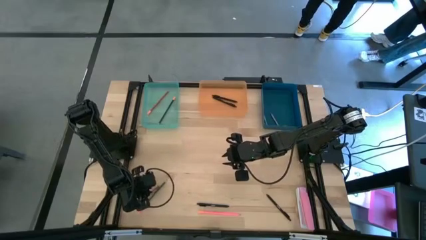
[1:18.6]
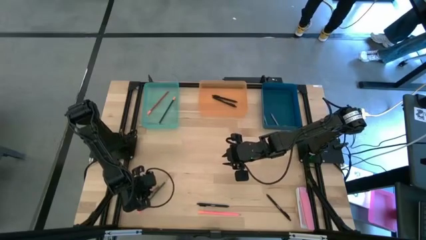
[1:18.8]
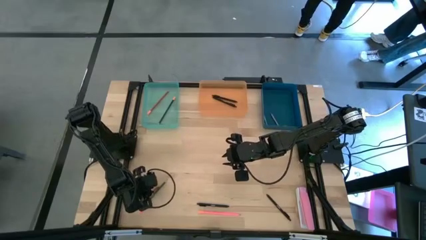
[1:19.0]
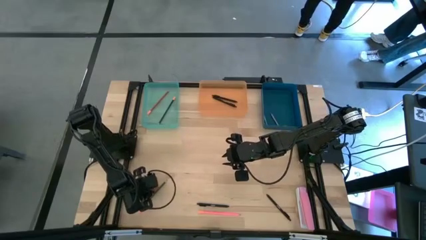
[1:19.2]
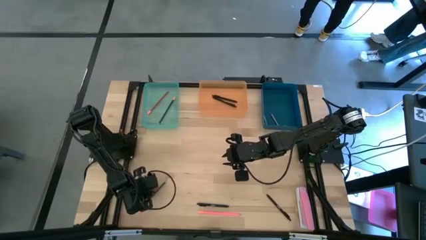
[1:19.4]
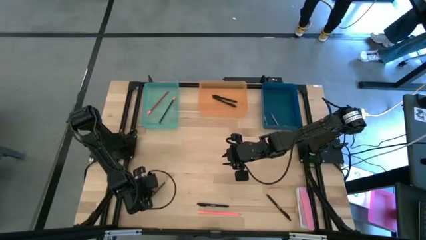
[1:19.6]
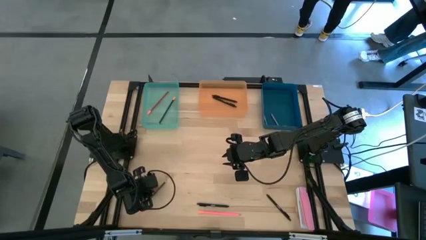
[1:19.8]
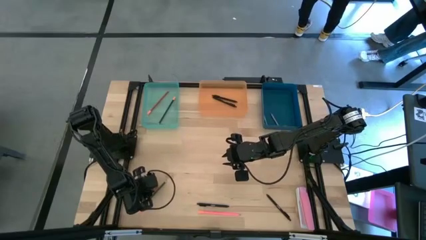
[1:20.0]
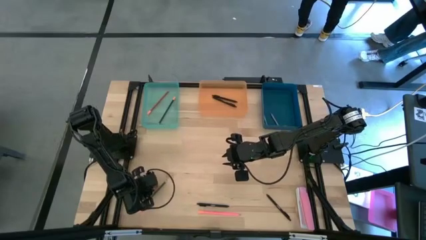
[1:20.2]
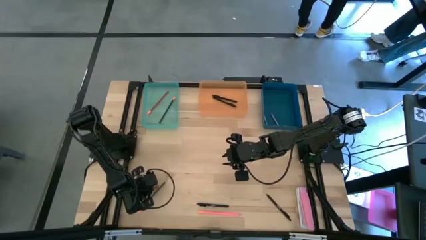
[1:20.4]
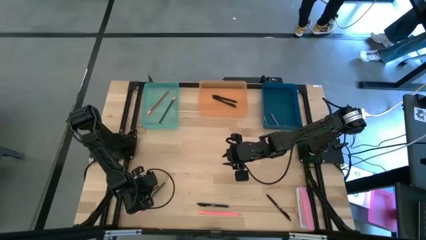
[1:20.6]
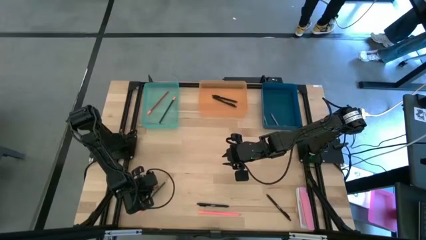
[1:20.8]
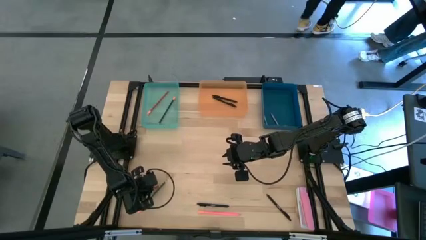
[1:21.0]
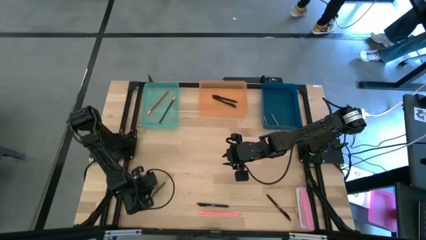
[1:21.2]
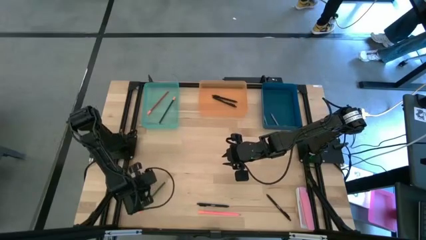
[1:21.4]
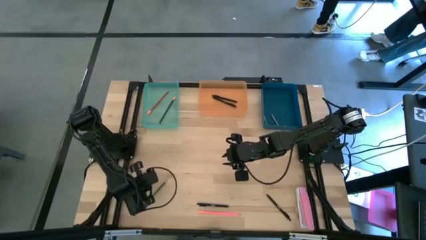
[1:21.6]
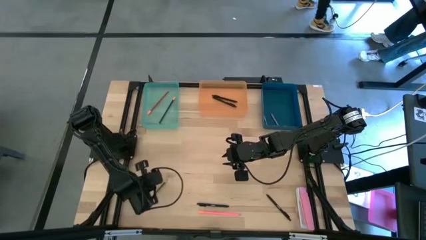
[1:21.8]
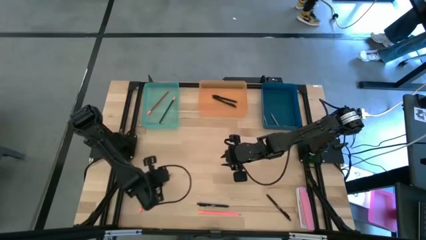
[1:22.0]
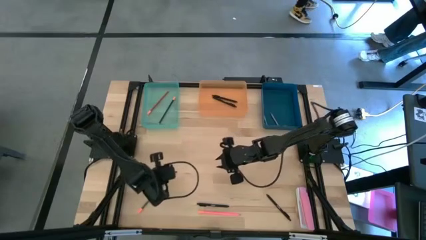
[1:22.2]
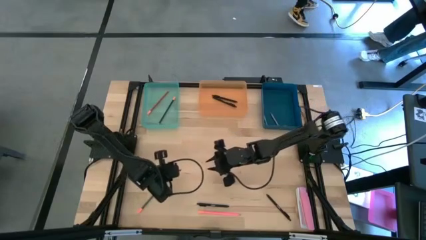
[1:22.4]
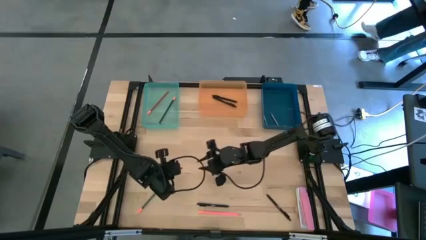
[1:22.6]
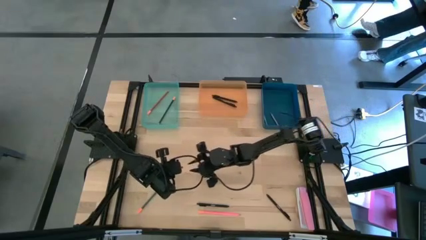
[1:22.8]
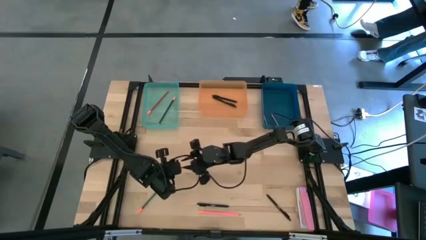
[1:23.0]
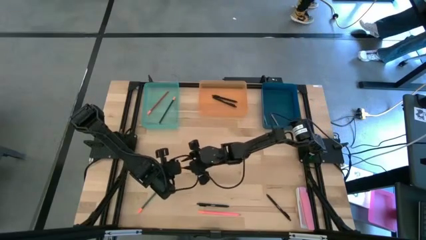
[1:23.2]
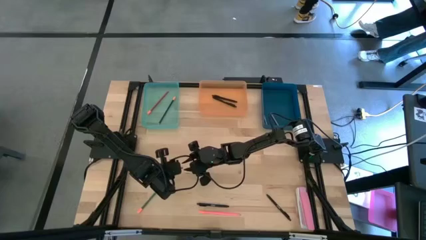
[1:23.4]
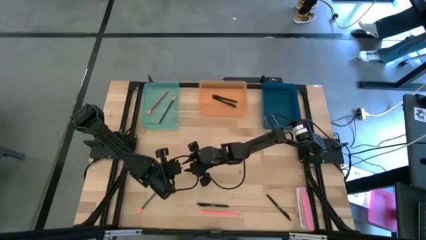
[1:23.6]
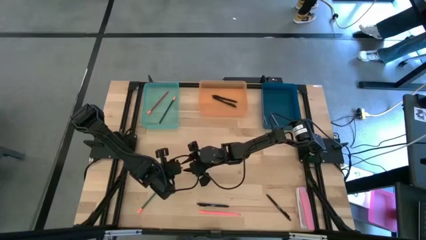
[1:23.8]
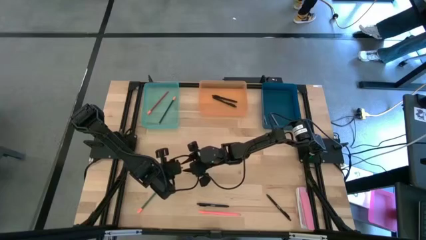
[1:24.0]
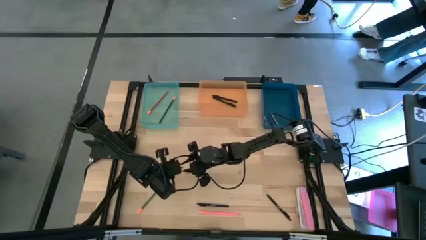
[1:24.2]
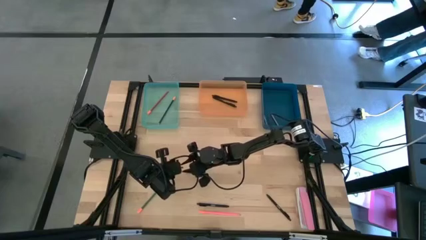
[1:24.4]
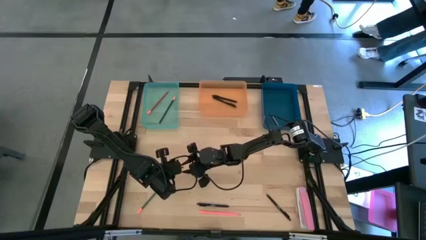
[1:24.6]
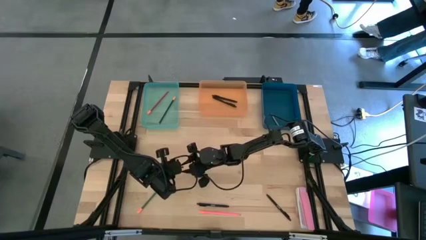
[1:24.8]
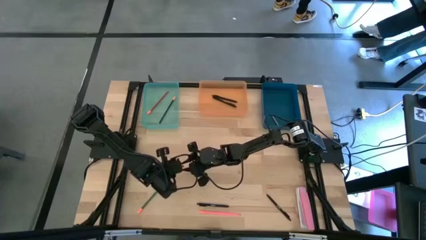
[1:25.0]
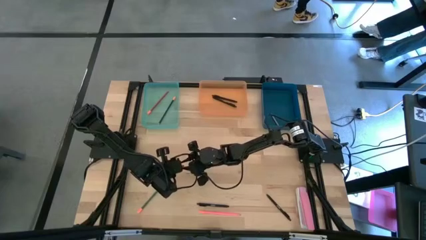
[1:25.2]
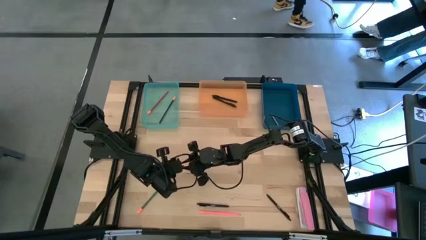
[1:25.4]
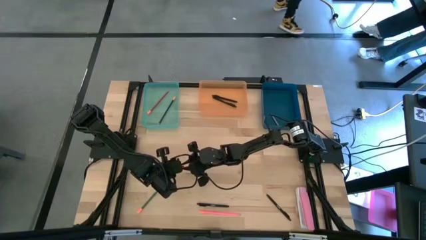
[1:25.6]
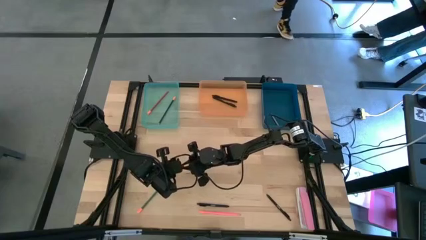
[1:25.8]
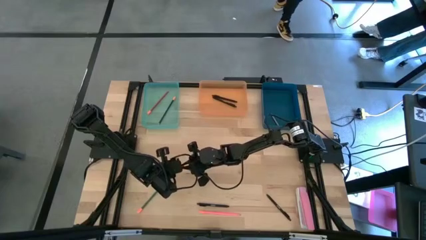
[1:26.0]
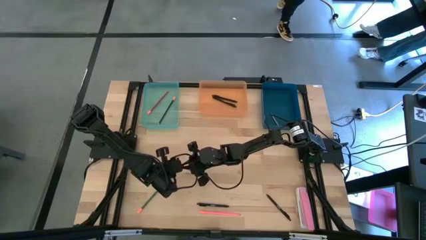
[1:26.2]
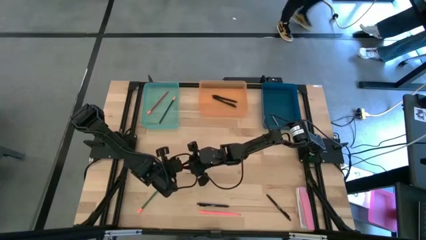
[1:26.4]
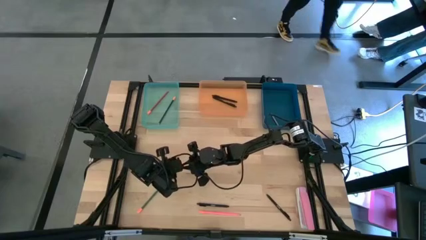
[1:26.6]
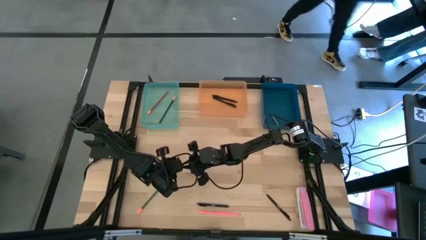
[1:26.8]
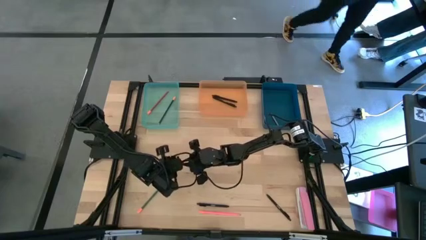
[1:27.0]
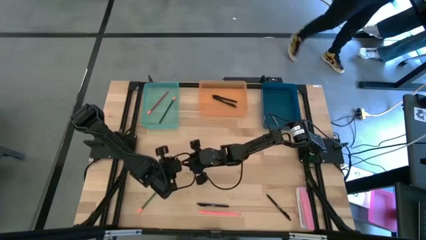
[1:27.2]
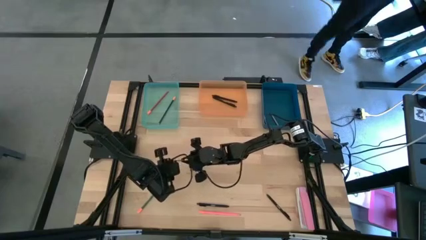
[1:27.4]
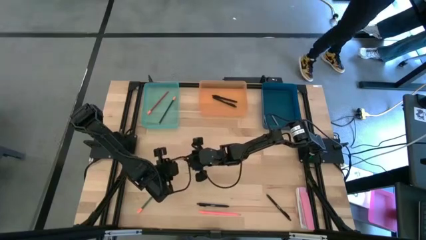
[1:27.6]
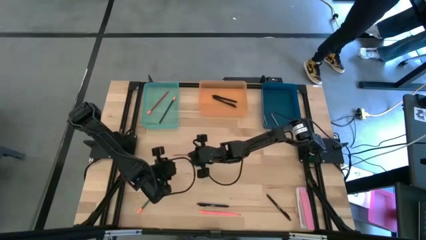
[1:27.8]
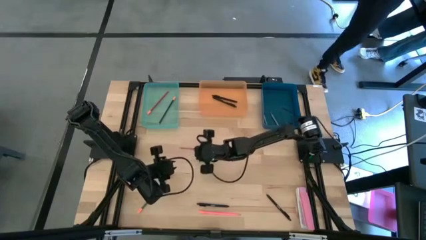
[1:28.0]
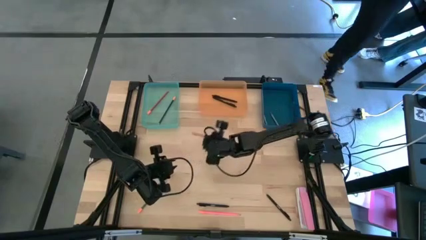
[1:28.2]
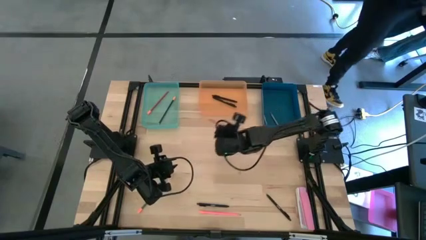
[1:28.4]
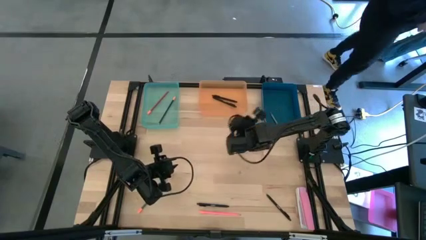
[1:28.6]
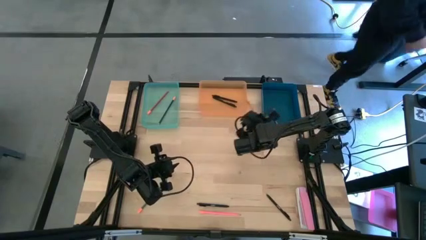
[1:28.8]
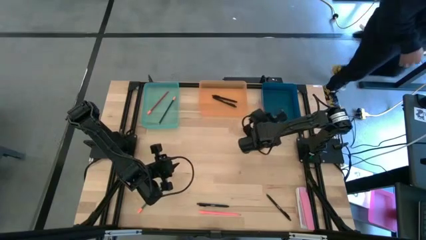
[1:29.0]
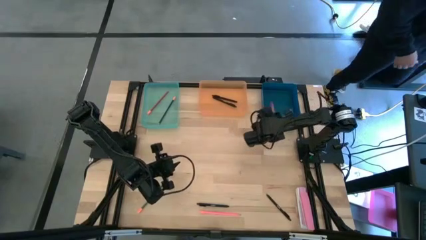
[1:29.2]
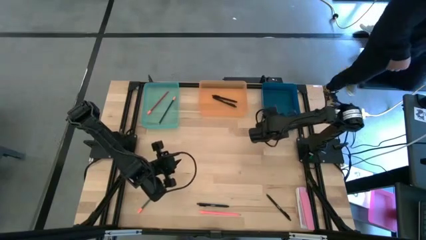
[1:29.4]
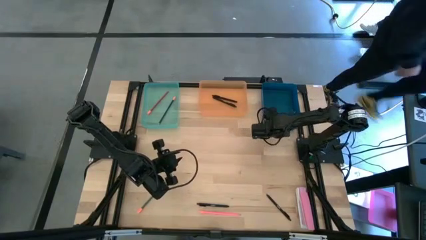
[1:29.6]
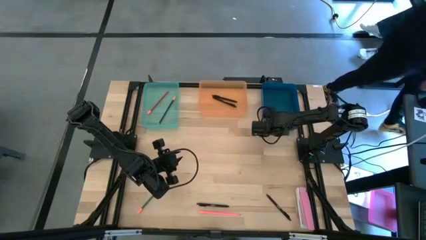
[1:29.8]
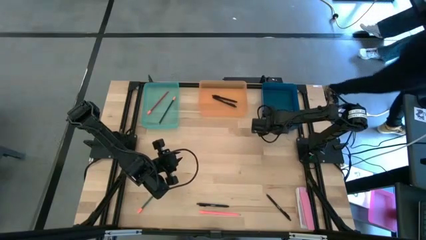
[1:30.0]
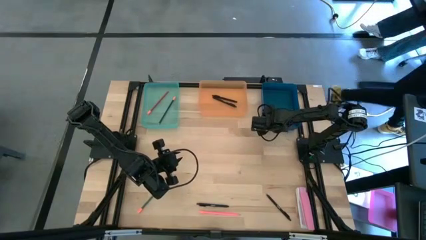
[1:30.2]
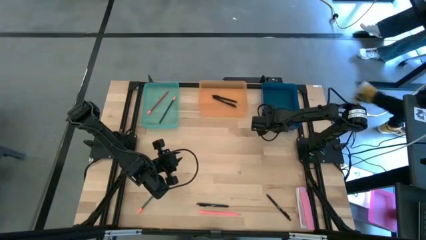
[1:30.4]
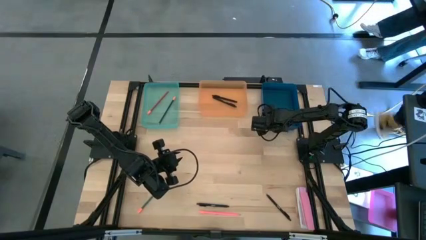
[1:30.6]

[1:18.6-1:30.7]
Task: Sort crayons/erasers/pens/pencils in bins
Put the red crayon into the blue bin

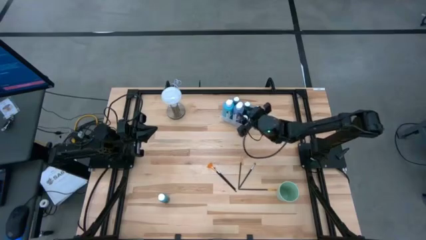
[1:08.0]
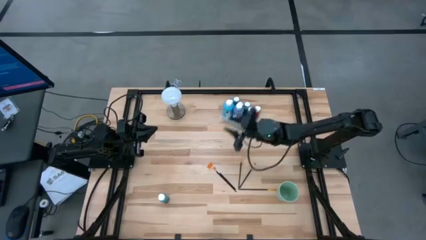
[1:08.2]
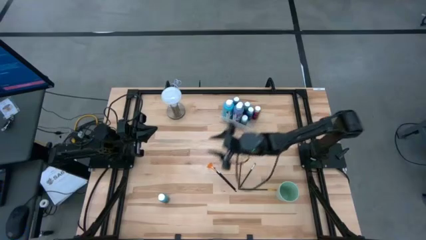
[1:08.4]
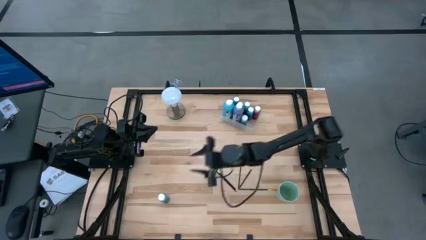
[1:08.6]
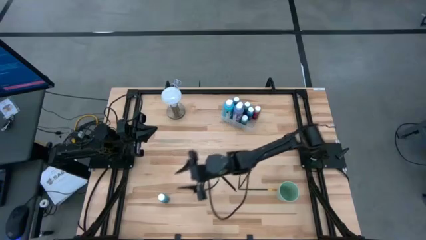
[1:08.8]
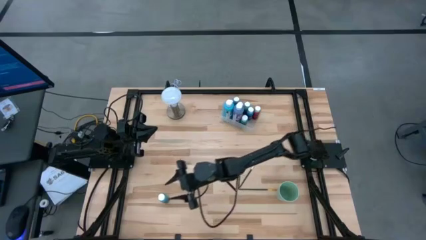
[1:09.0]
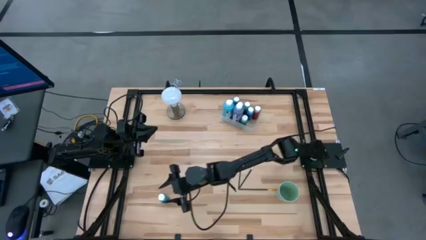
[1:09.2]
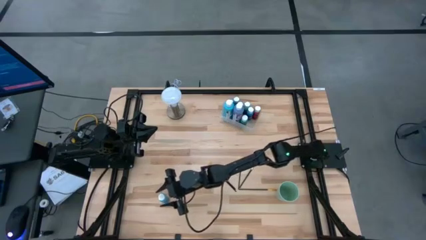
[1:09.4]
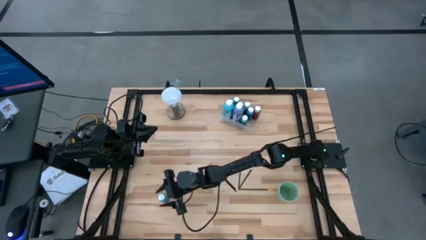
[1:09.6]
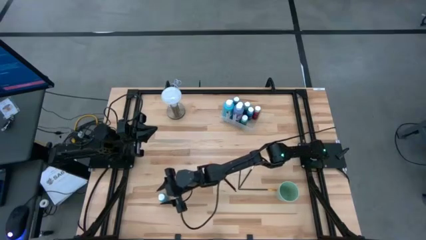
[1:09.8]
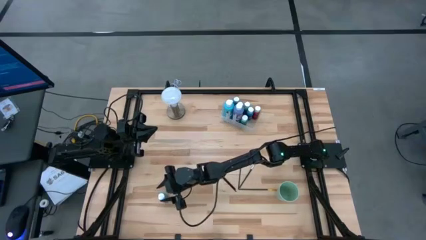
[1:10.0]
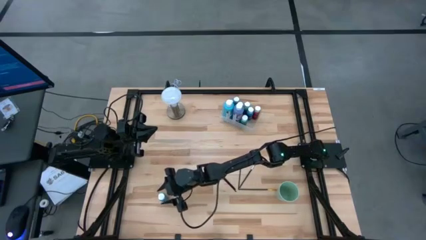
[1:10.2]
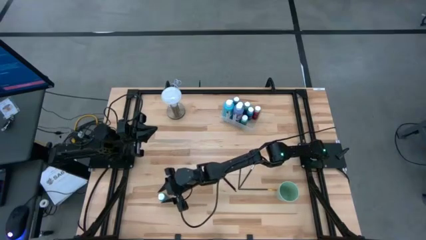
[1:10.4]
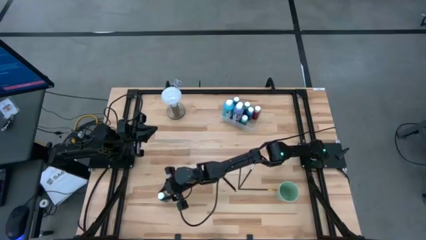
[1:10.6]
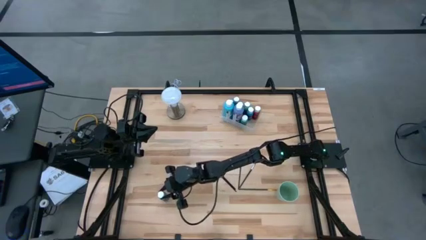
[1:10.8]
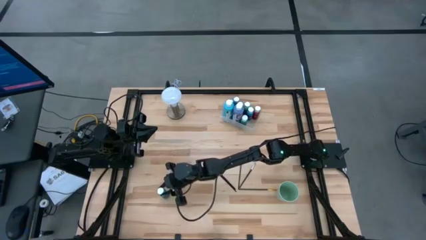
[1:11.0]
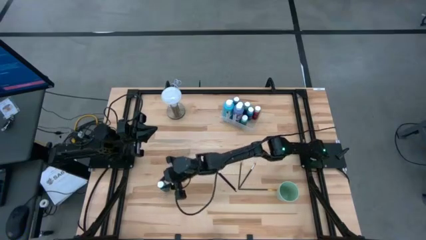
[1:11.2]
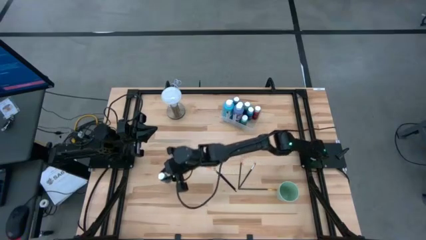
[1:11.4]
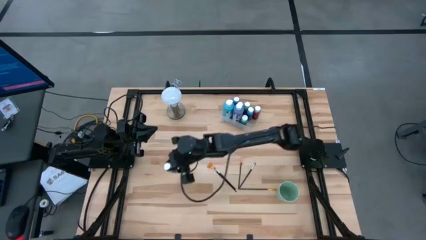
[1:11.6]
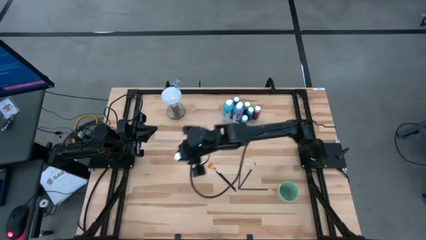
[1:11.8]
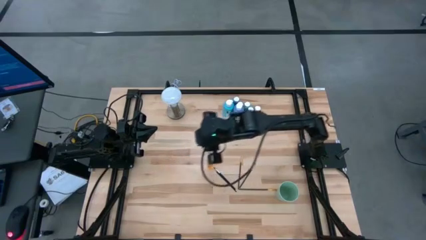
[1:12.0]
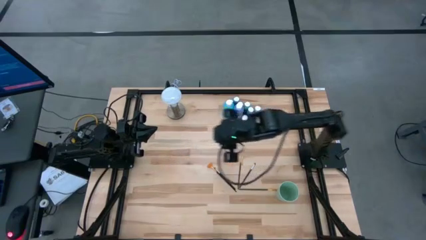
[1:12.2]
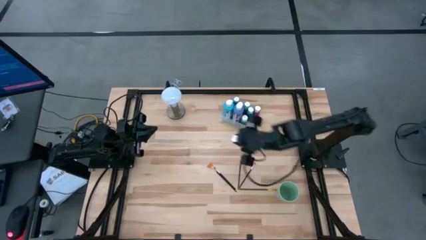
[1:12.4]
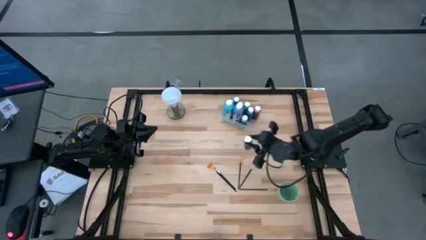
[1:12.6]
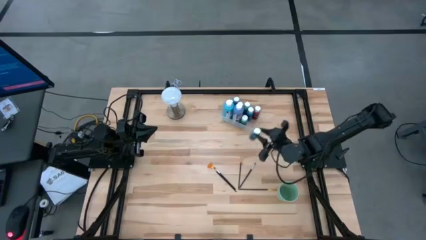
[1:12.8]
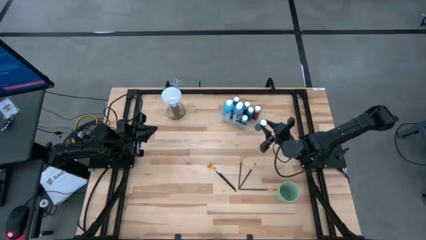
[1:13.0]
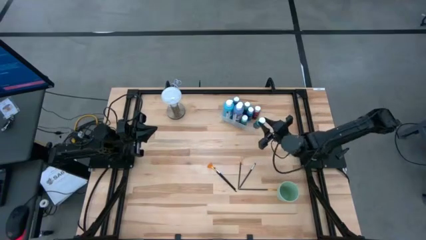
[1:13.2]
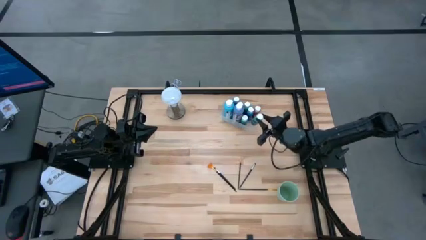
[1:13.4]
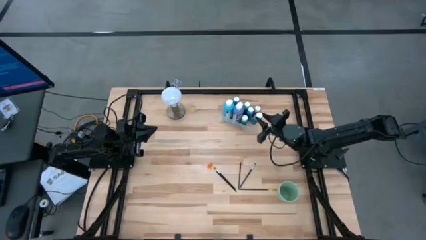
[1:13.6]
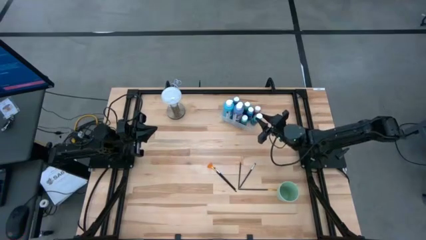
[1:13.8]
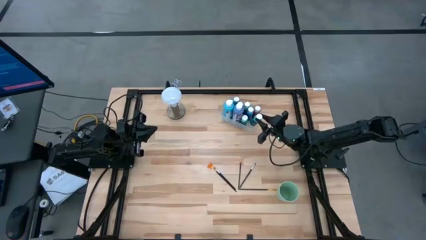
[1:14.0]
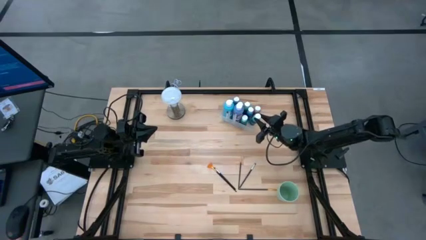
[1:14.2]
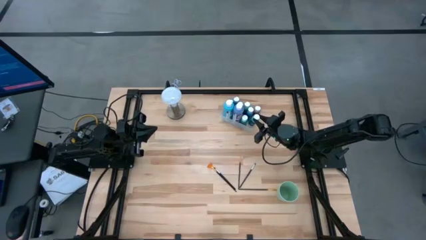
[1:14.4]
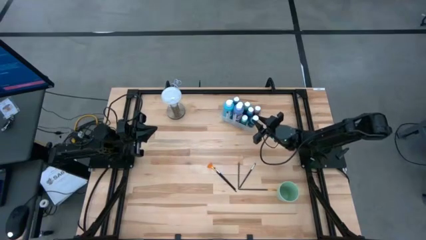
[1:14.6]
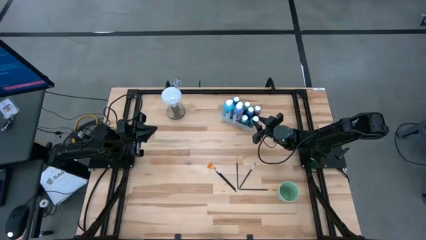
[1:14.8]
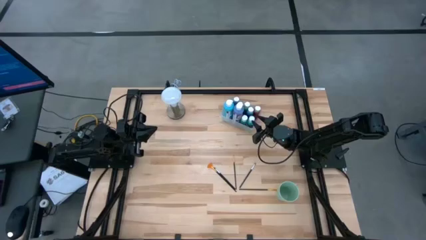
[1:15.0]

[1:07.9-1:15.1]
Task: Pick & Place Paint Supplies
Put the small light blue paint bottle into the transparent bin
